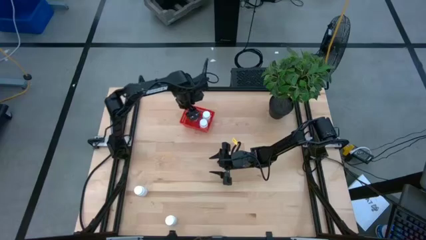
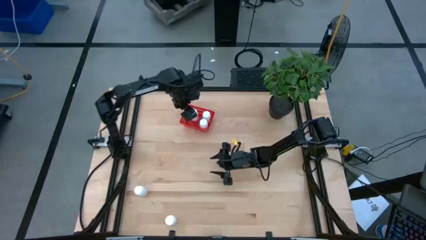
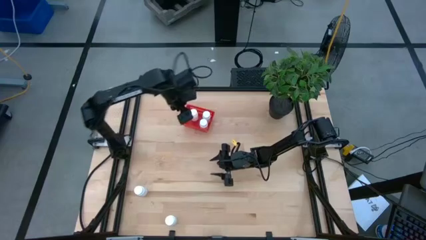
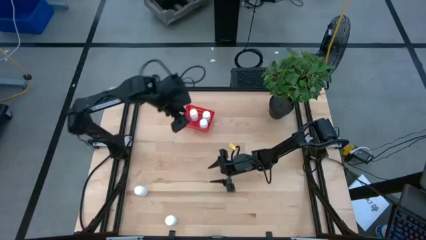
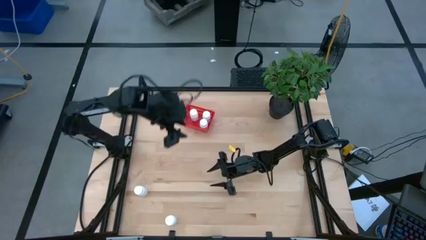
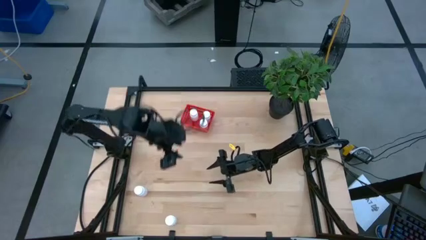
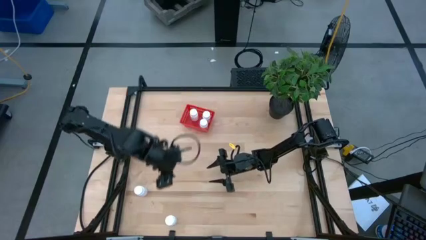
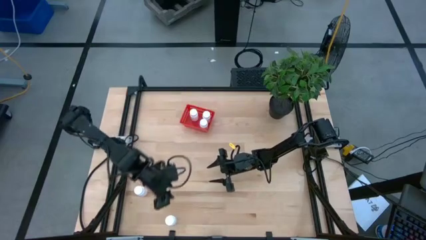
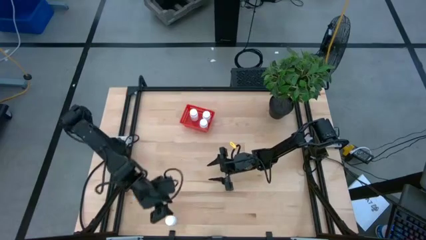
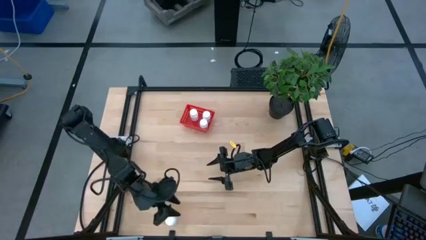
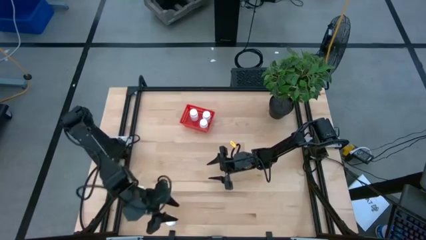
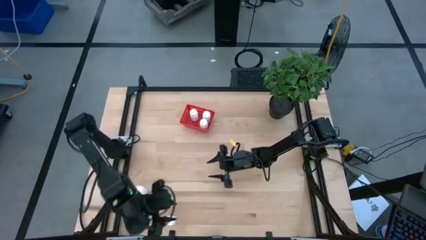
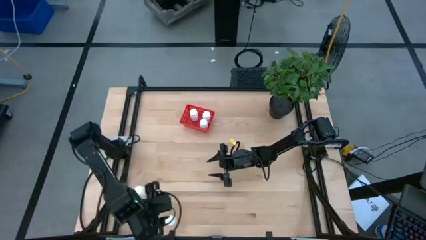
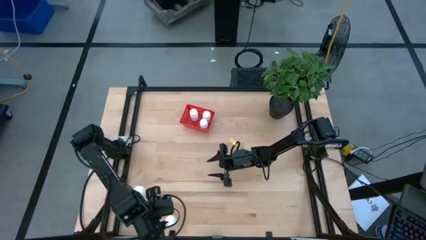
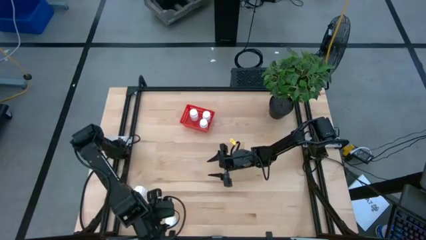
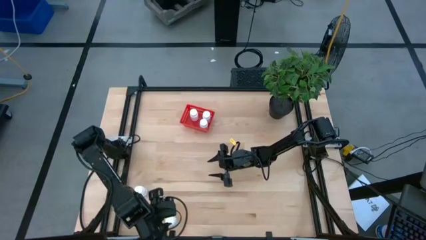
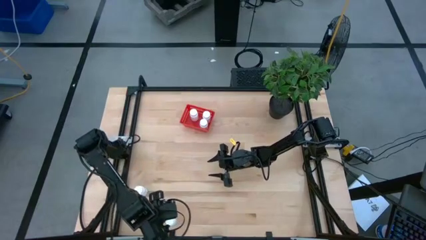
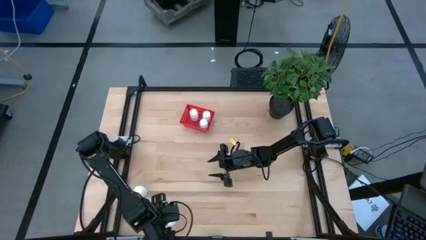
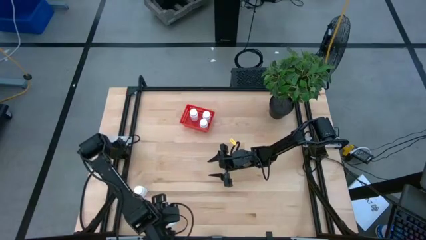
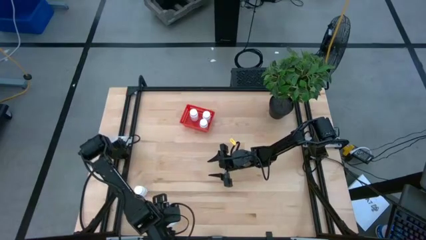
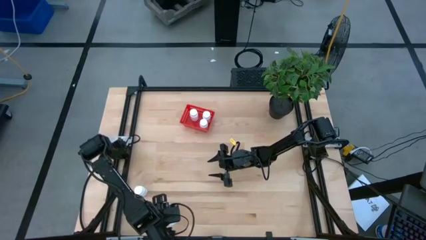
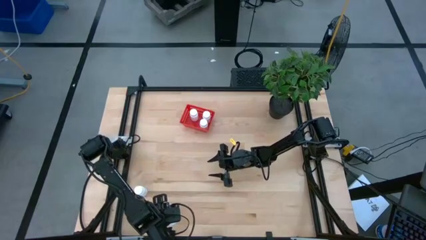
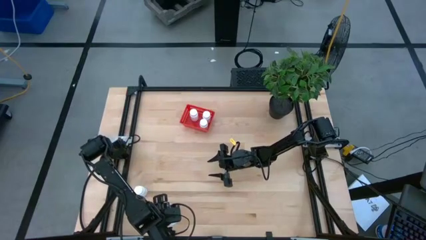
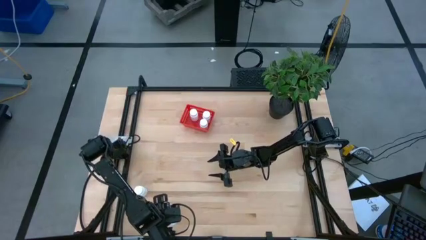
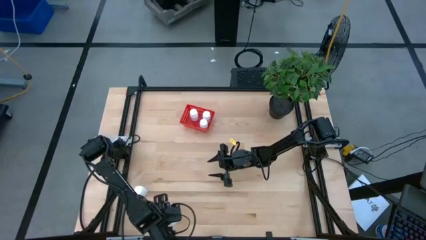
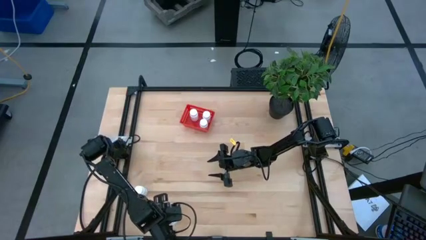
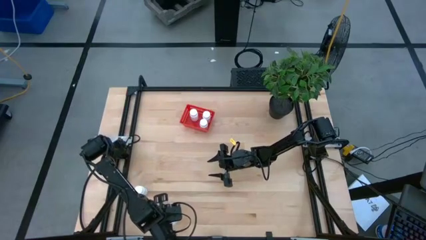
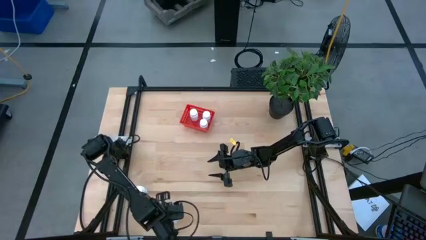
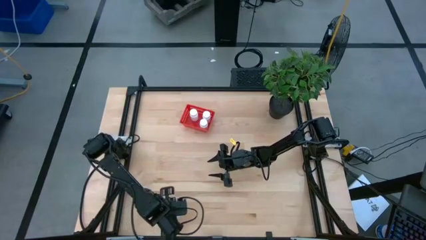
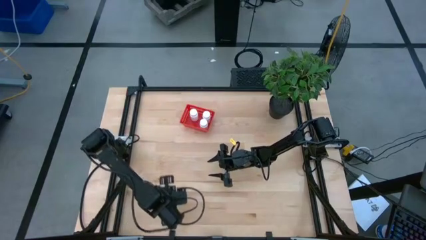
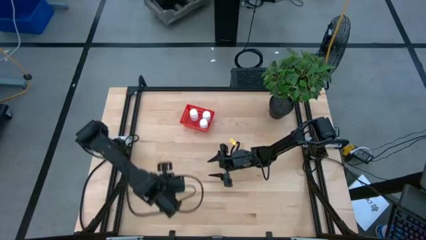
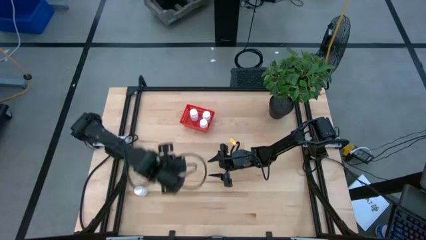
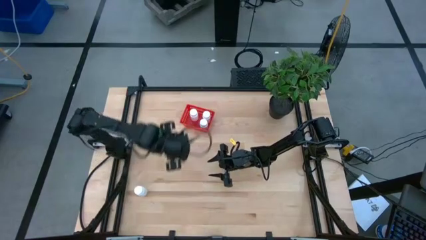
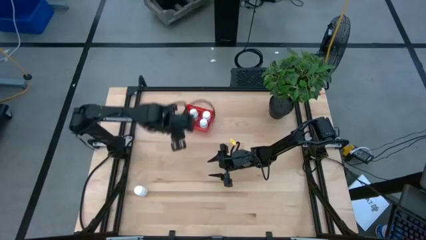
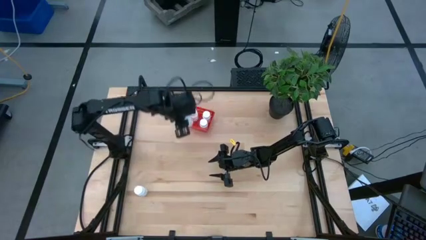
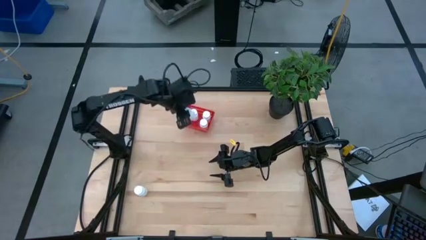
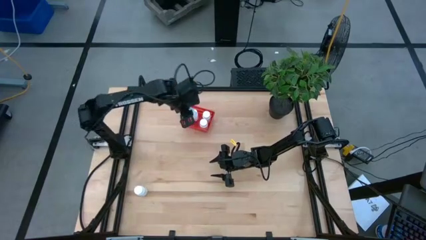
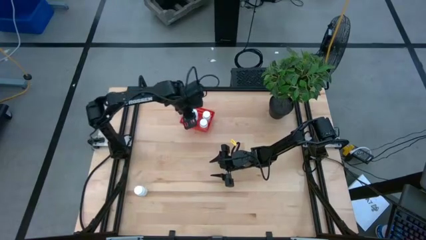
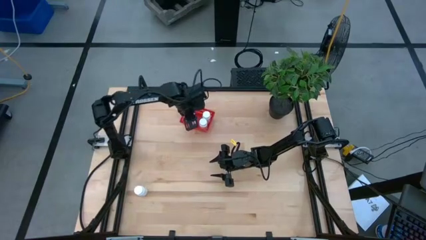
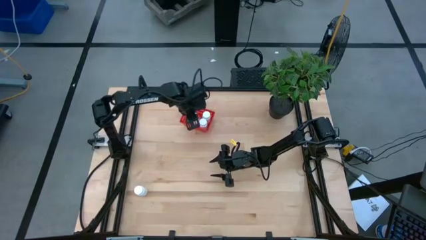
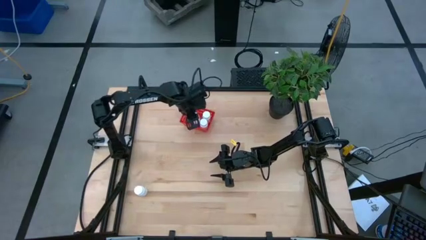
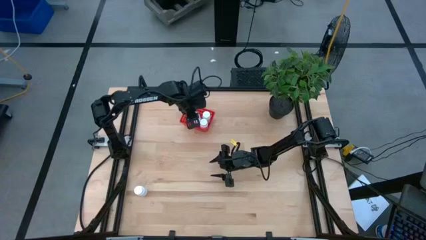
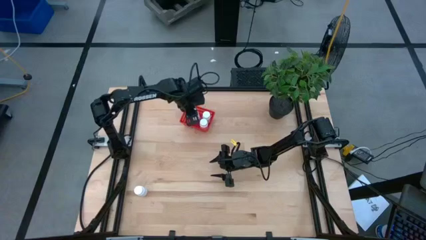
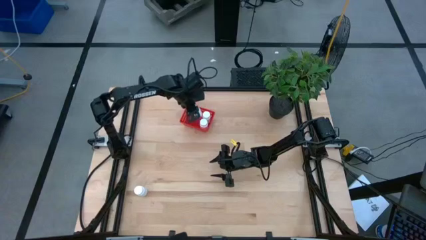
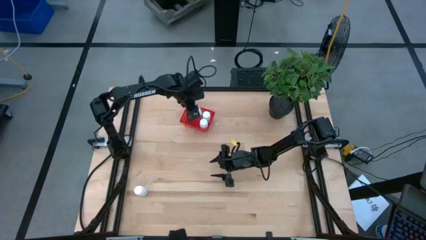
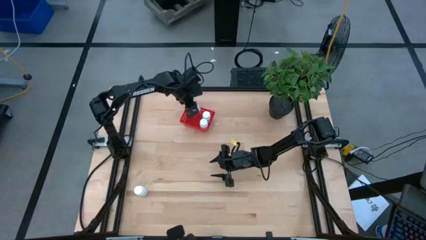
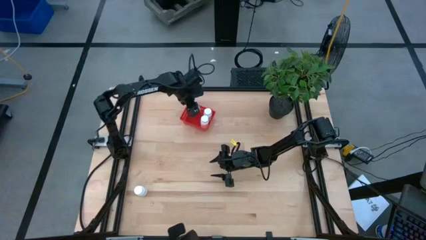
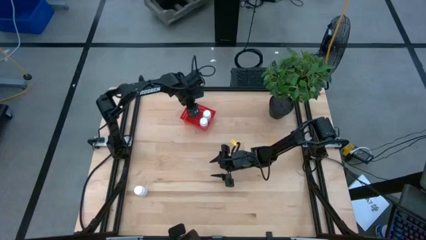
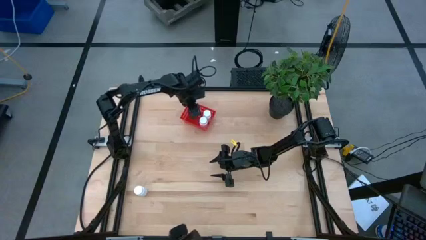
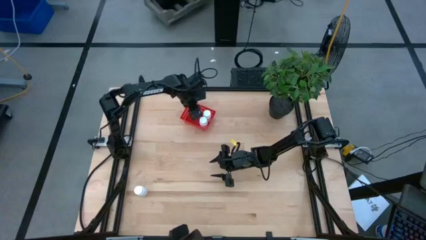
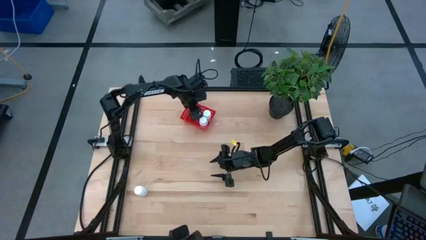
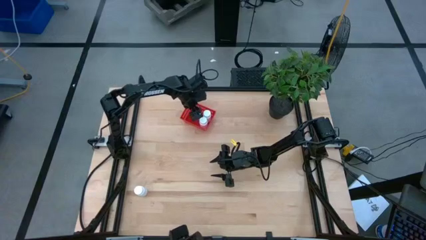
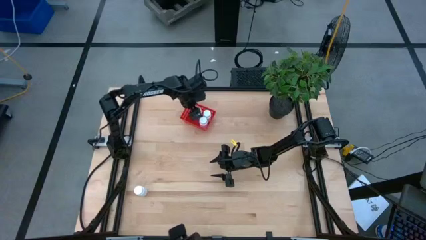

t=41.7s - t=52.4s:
Task: Pick and place pill bottles into a basket
Put the white pill bottle into the orange basket
